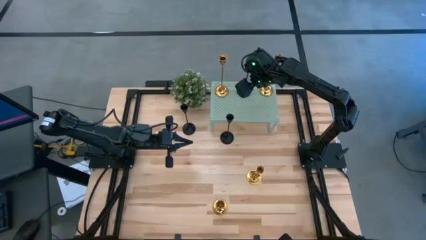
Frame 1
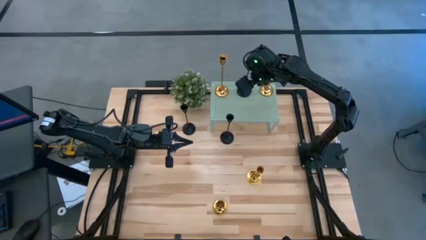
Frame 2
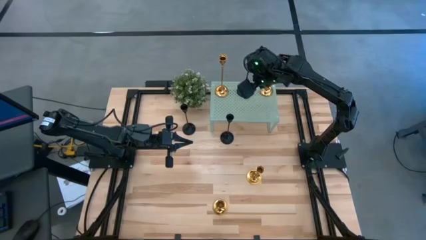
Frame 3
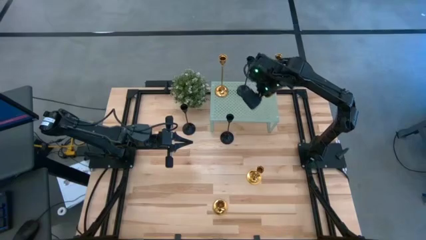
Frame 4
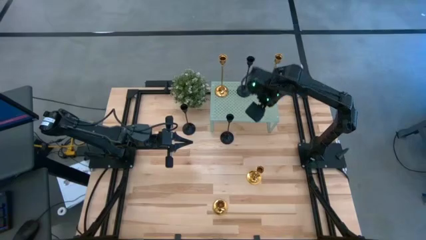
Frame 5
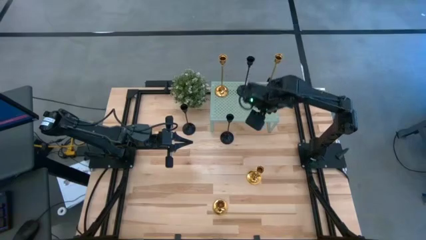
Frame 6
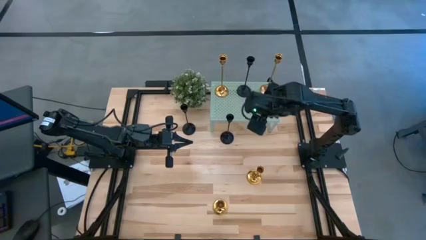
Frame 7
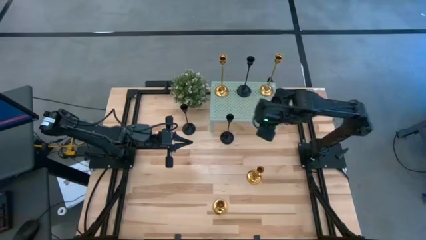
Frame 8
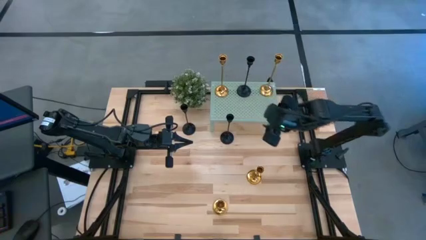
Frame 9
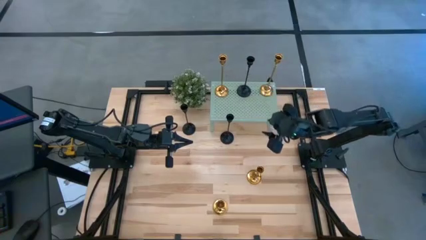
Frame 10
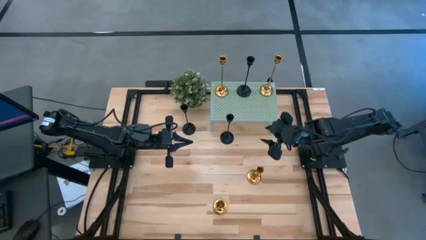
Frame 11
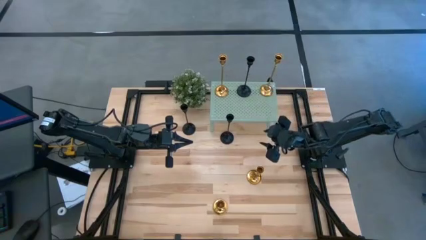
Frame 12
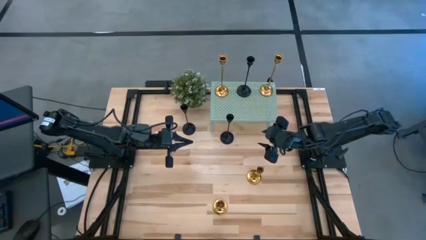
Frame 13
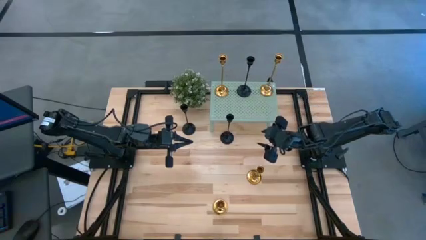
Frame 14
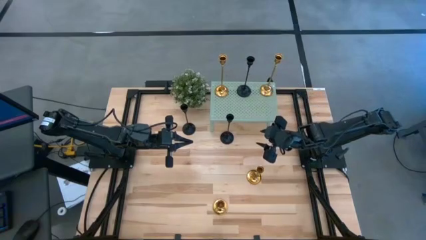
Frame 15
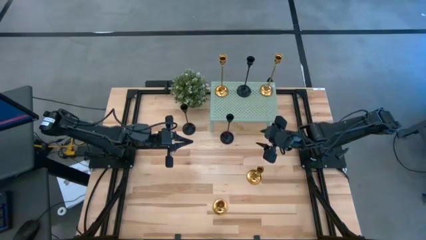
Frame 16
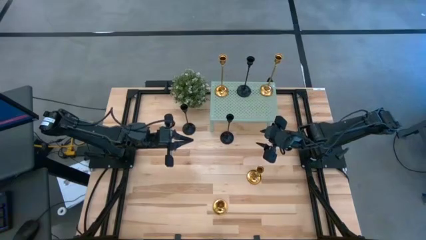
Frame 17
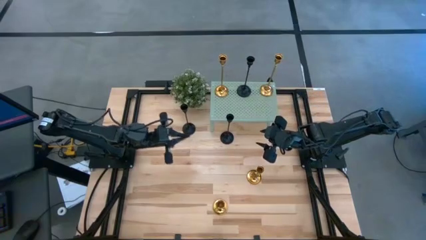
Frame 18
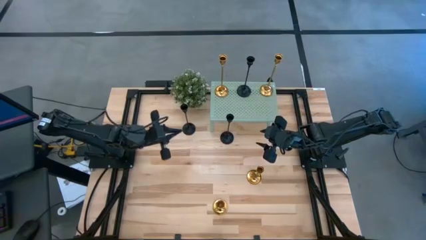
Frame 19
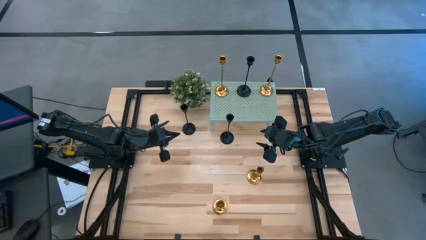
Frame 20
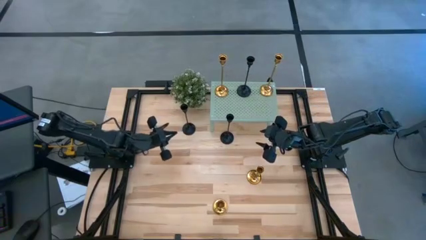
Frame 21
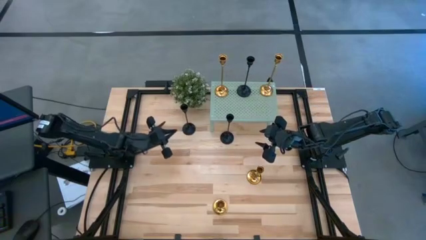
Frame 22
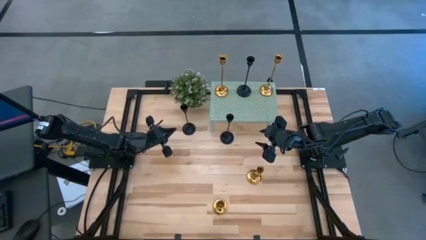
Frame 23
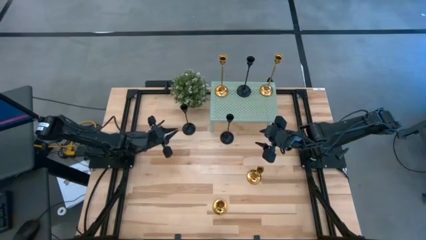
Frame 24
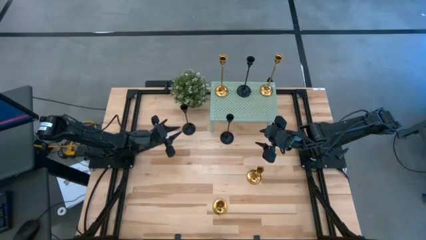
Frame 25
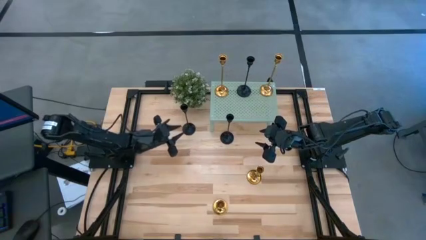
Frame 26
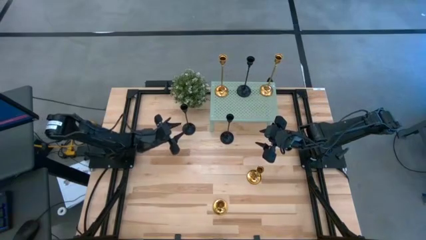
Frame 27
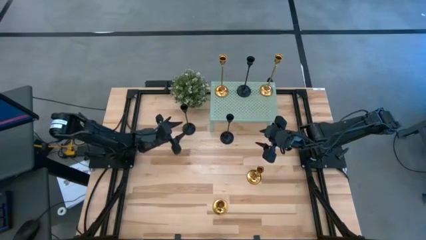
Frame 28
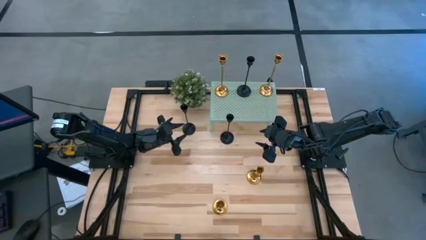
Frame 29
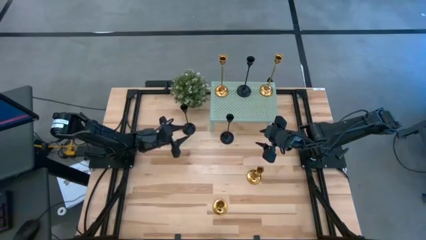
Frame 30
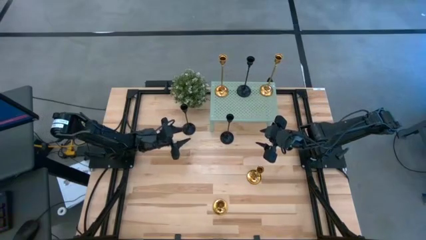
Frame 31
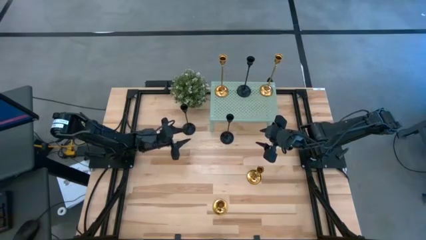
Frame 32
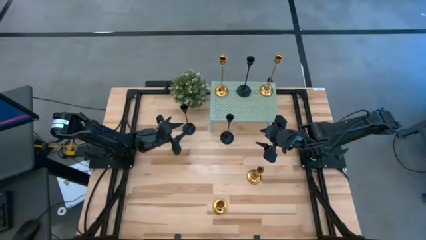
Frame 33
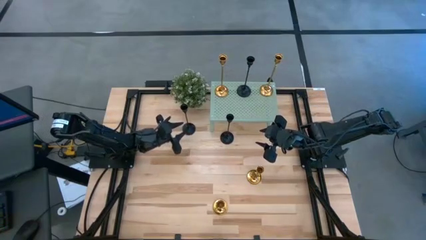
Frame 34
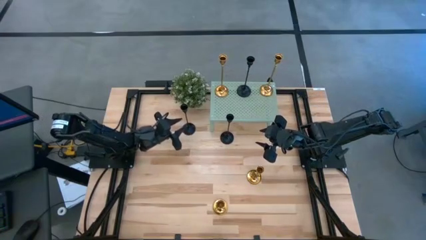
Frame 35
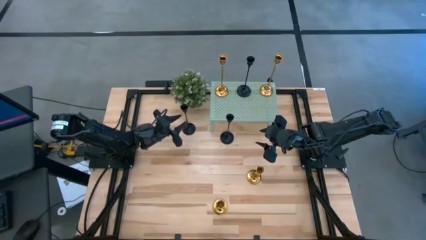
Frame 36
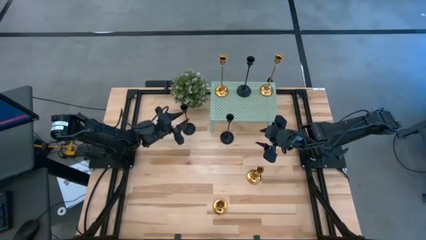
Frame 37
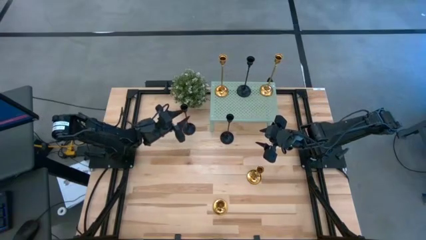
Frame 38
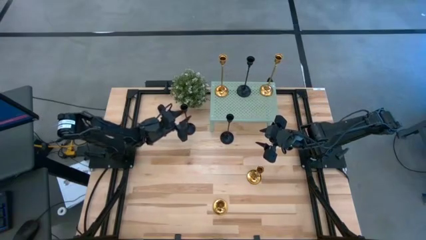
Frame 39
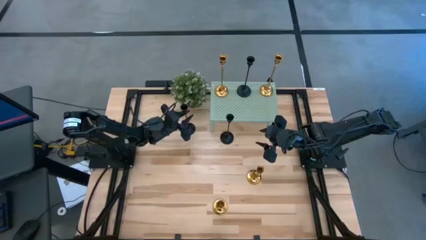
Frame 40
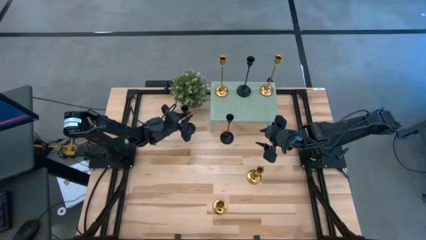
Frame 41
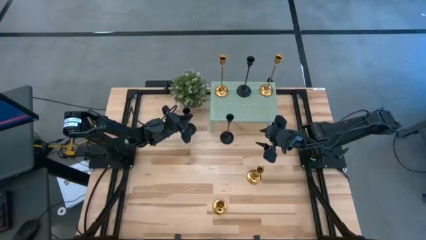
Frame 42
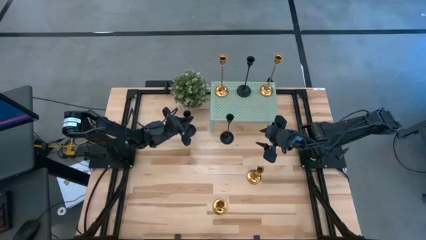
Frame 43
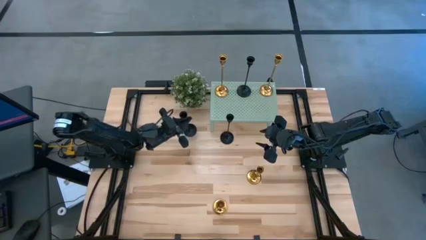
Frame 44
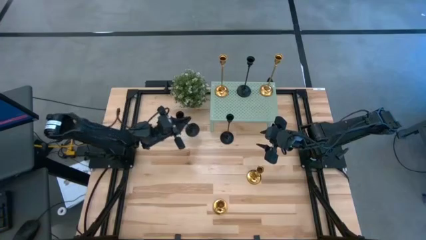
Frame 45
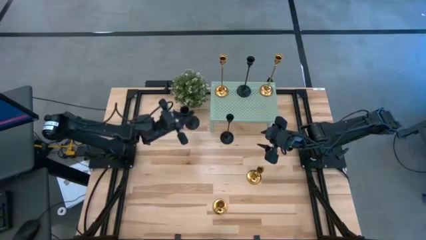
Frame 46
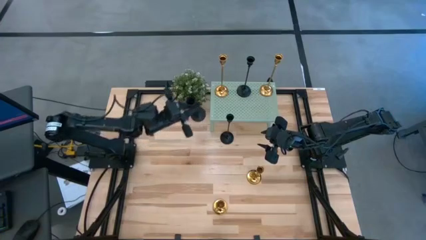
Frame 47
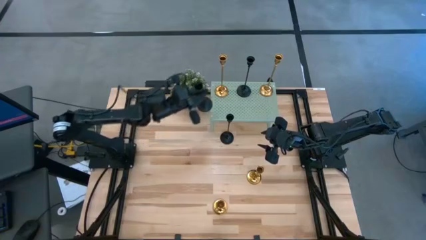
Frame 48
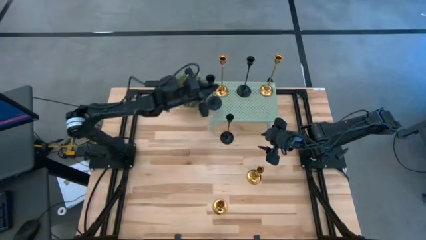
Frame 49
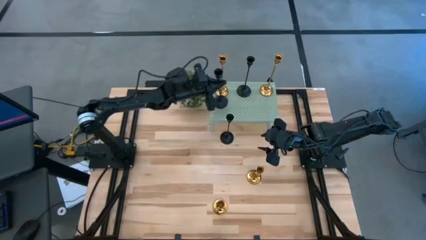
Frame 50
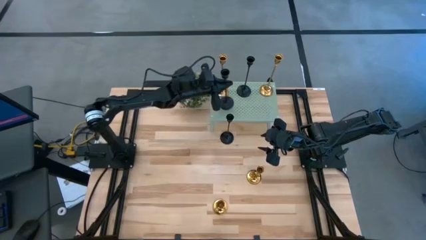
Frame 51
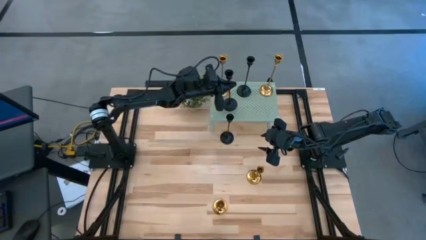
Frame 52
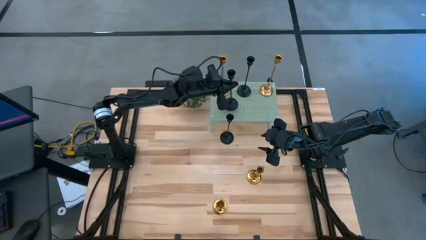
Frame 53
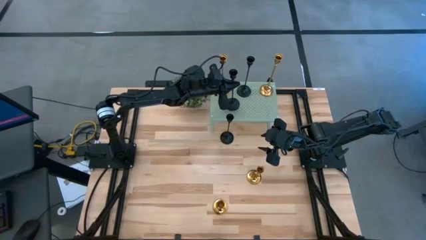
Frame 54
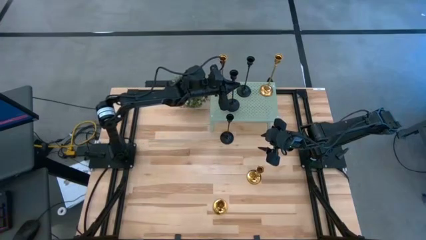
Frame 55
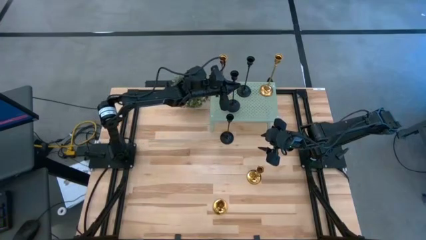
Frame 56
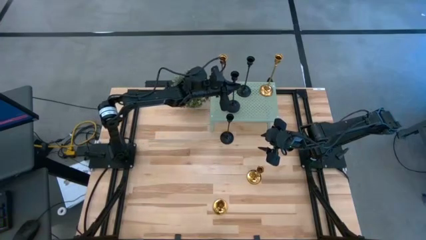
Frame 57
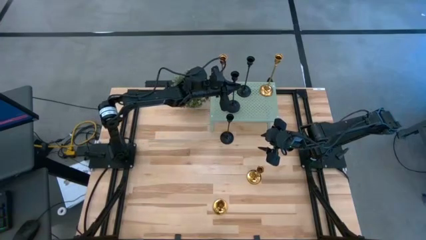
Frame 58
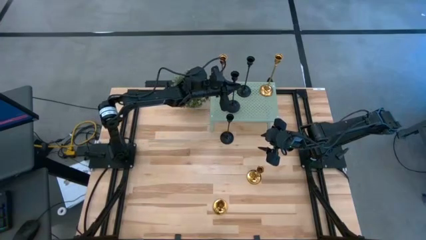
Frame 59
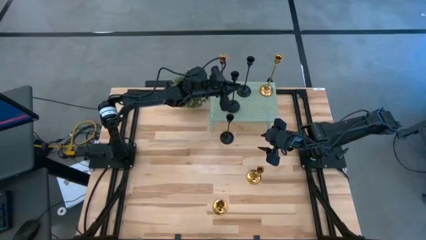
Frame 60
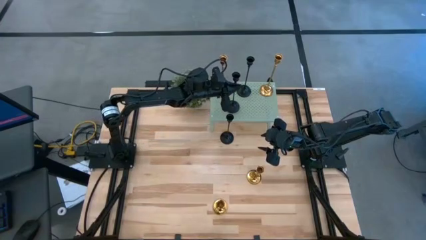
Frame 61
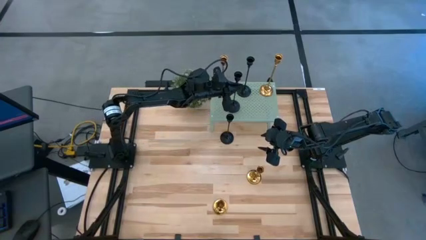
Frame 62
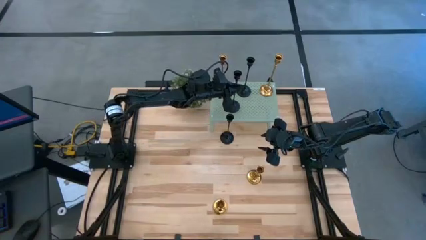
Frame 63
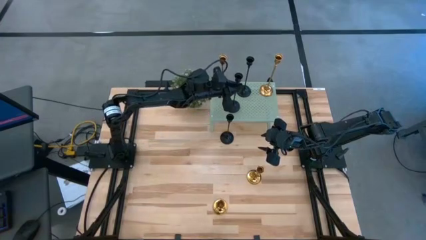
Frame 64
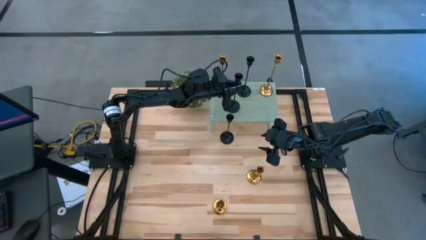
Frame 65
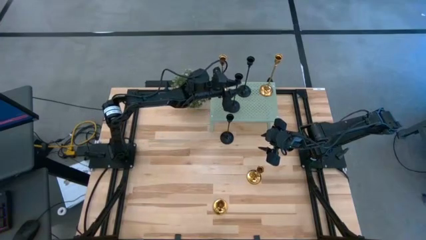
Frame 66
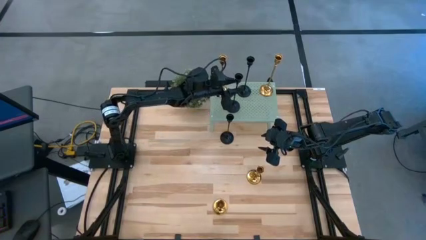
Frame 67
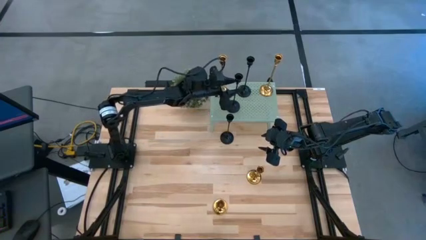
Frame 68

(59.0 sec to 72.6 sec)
Task: Pick & Place candle stick holders
Put the black candle holder on the shelf

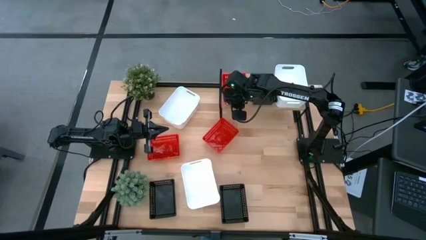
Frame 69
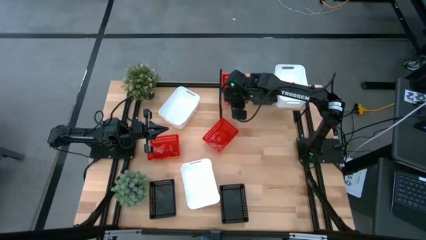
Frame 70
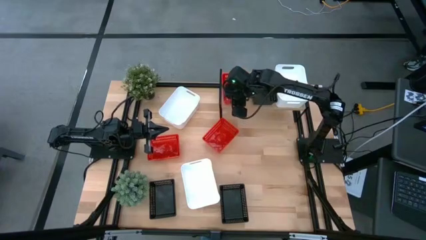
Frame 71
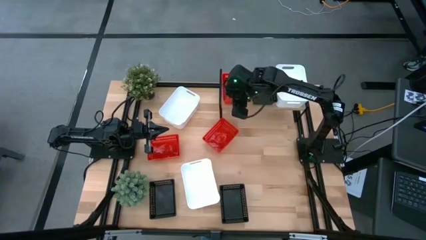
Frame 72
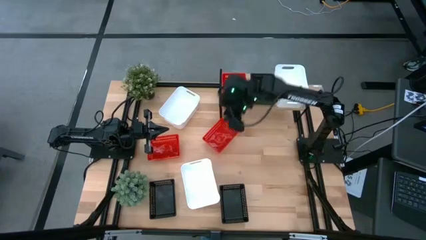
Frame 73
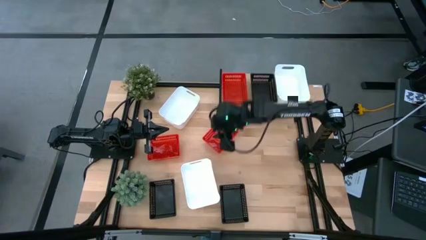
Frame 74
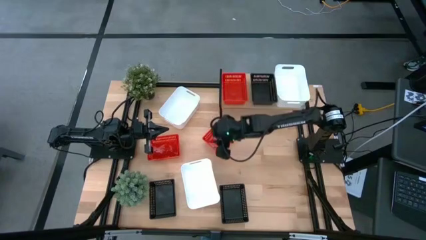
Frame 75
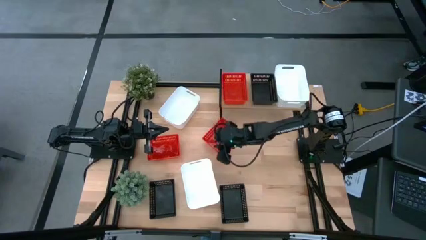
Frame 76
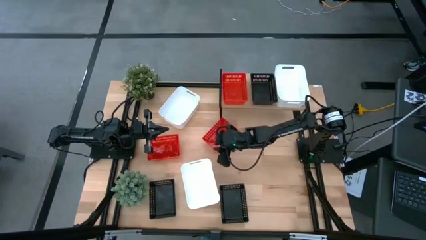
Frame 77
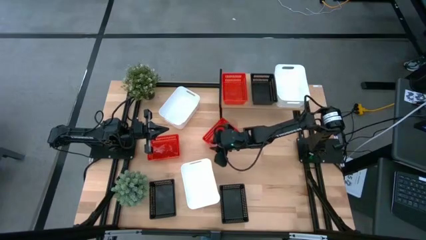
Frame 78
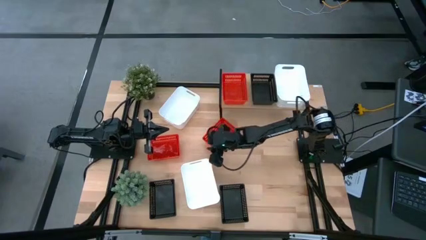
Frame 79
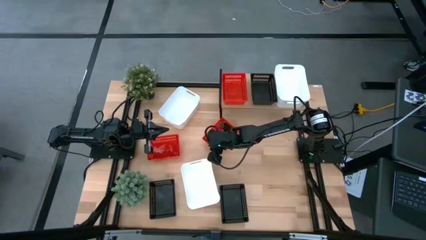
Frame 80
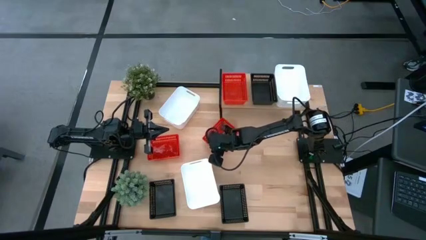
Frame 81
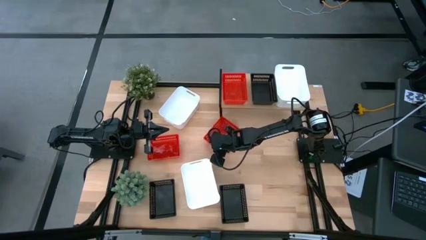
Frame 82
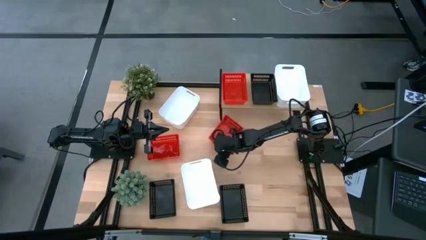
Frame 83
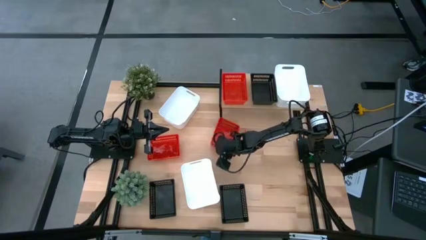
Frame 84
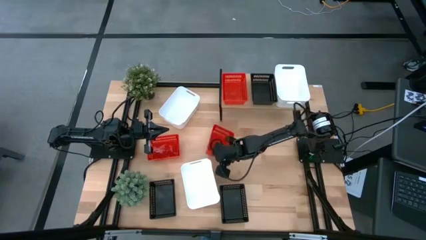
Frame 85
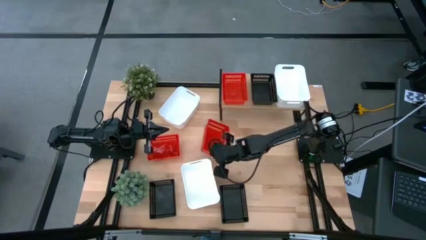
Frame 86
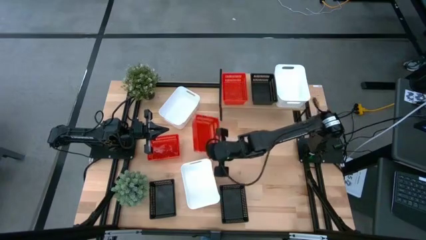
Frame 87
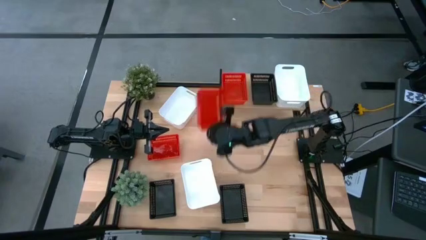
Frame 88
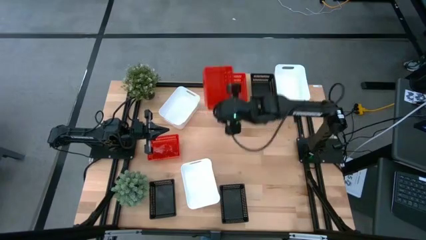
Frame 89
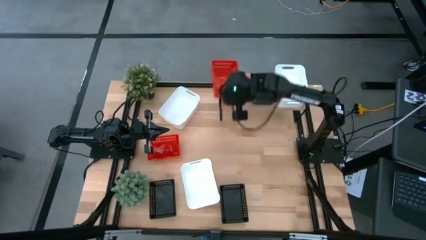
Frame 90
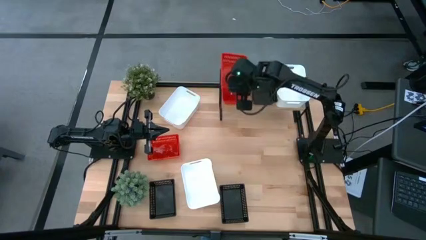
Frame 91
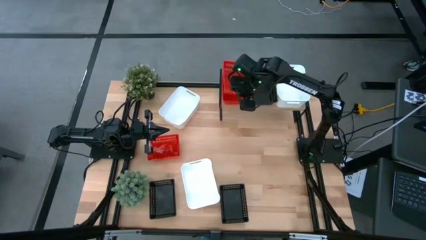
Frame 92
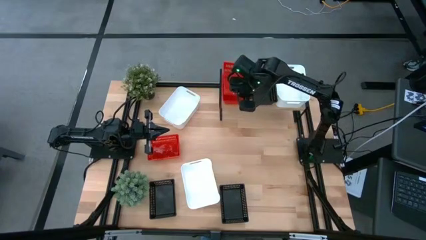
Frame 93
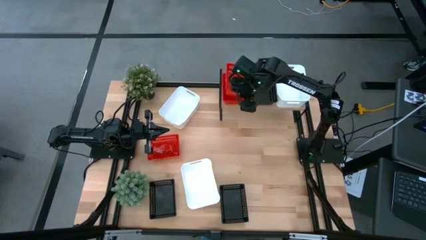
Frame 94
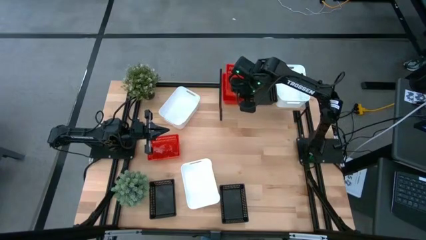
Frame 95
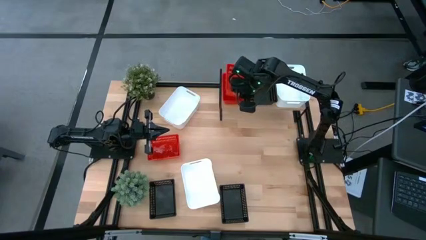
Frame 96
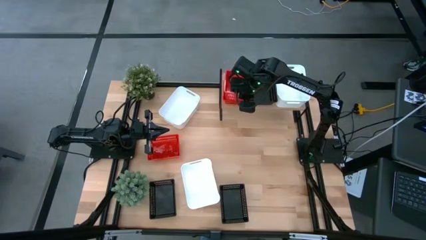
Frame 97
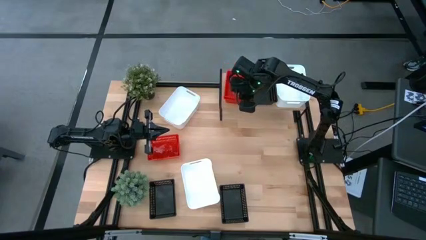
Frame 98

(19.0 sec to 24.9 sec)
Task: Stack baskets on shelf by color
Stack the right red bin on the top of the red bin on the shelf
